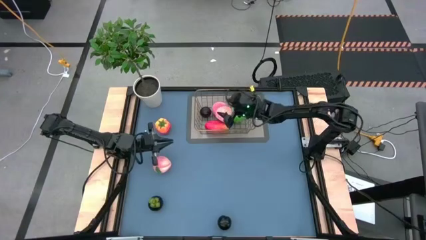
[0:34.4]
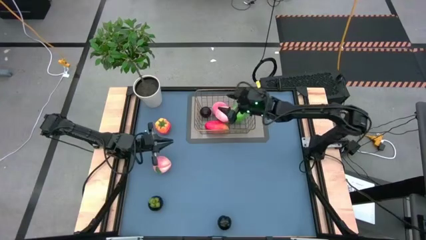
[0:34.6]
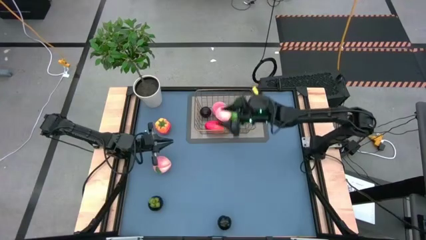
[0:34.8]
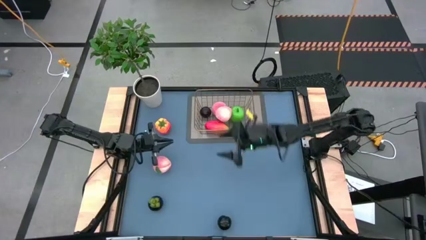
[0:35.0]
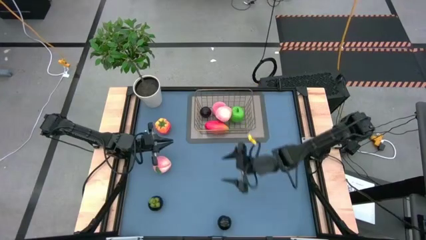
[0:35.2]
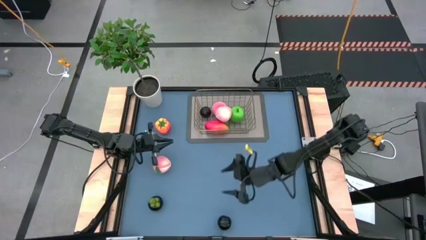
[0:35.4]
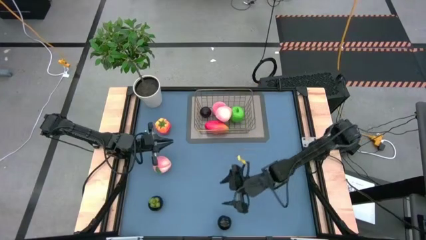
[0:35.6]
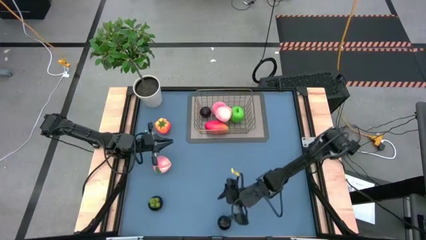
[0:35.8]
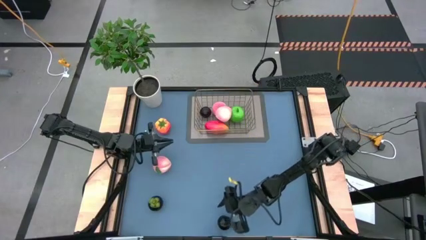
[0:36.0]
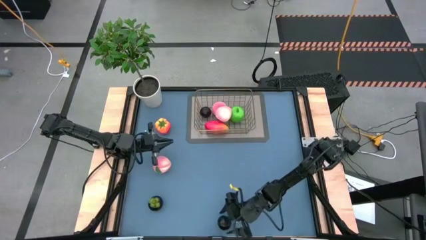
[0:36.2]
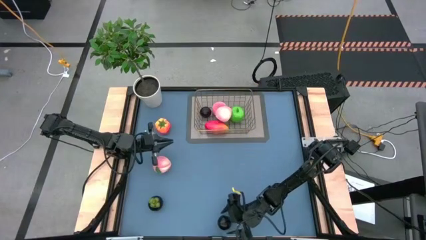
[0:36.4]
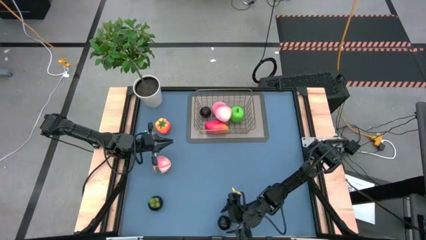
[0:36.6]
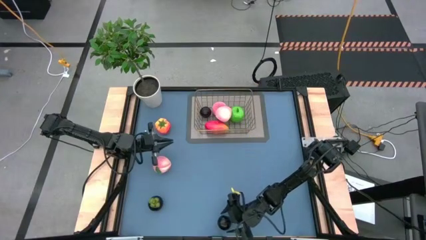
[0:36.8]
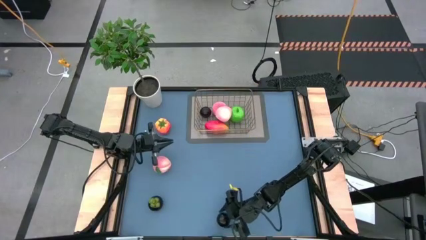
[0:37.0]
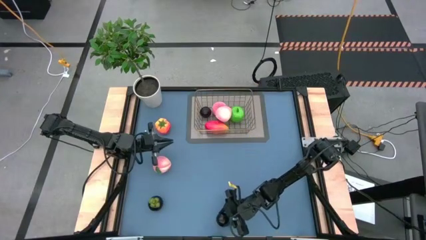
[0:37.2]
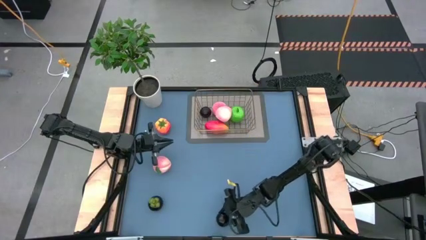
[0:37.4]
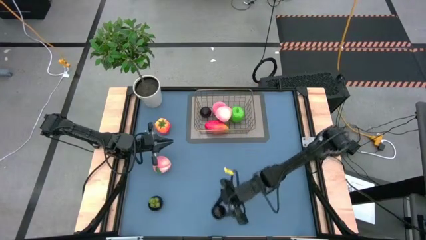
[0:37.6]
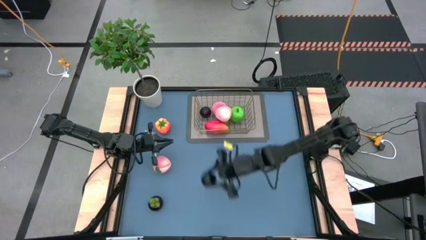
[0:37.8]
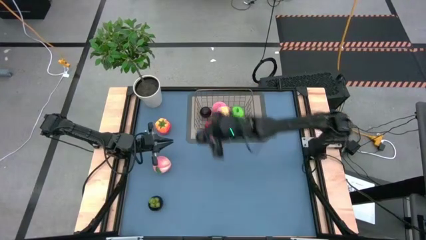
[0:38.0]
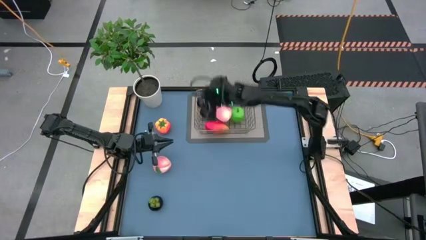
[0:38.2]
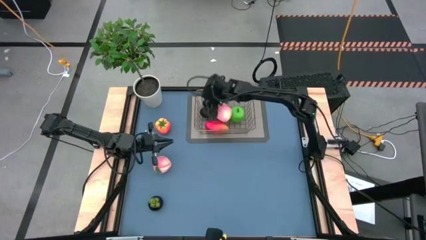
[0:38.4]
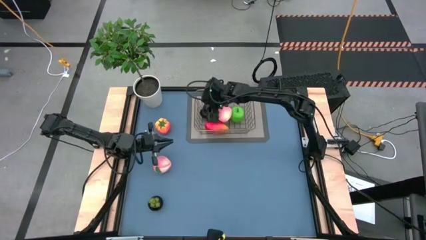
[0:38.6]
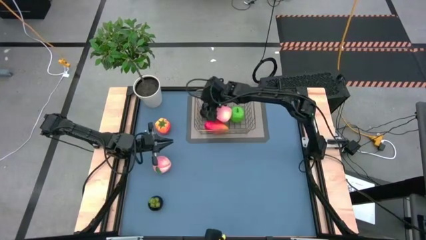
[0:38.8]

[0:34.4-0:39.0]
Task: Build produce basket
Put the right black plum into the wire basket

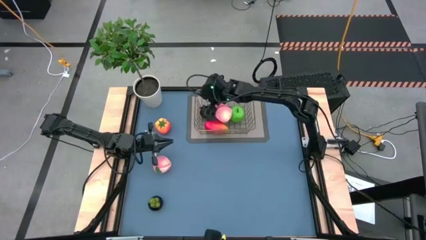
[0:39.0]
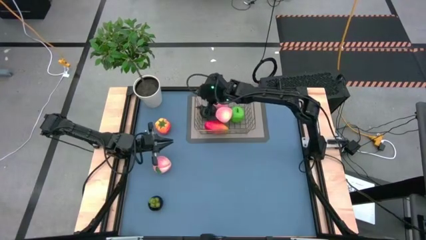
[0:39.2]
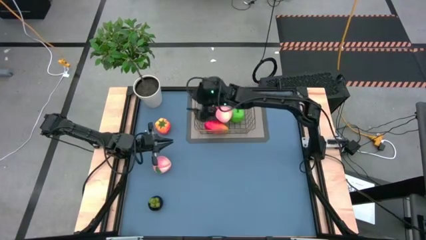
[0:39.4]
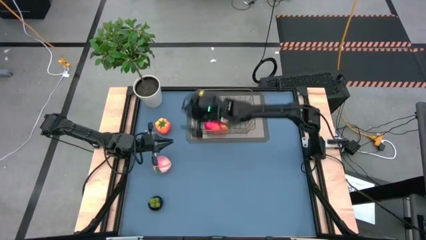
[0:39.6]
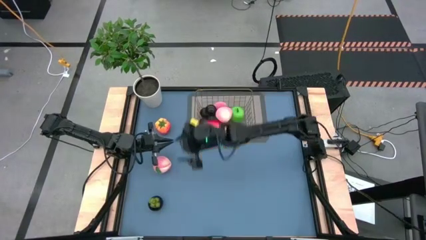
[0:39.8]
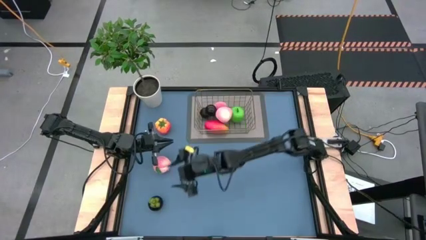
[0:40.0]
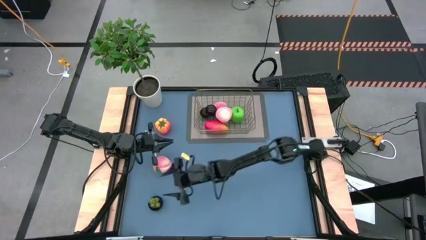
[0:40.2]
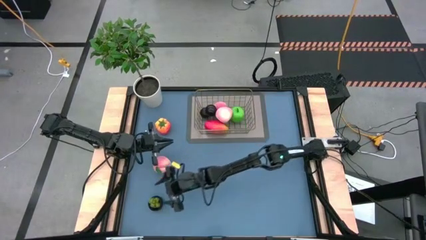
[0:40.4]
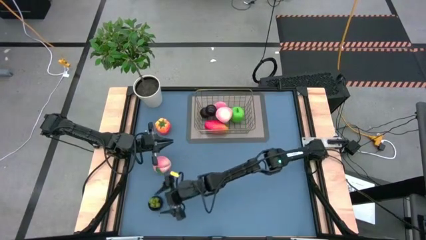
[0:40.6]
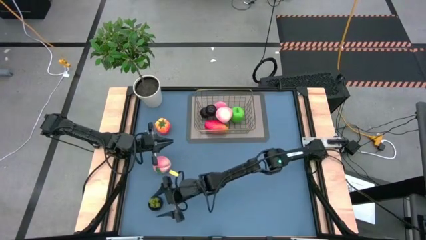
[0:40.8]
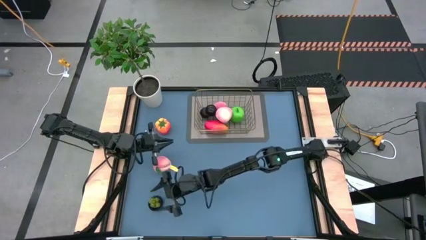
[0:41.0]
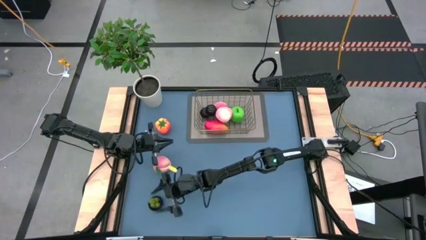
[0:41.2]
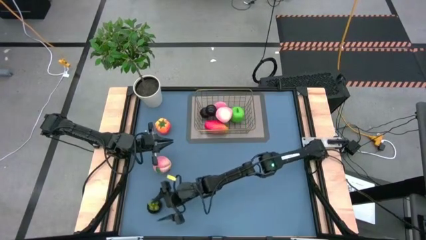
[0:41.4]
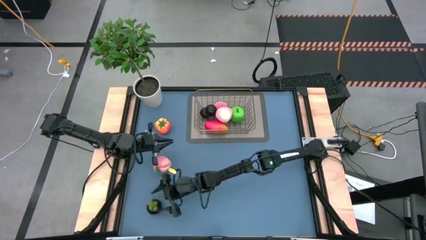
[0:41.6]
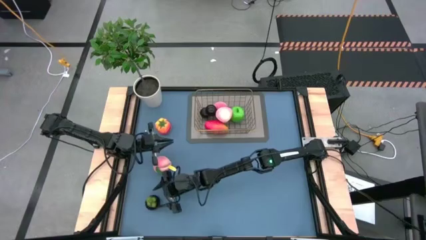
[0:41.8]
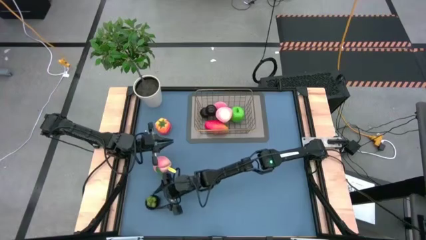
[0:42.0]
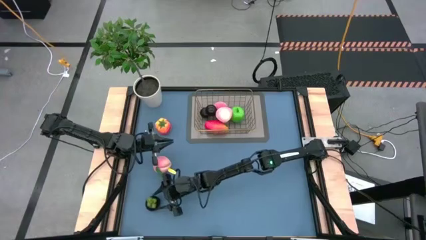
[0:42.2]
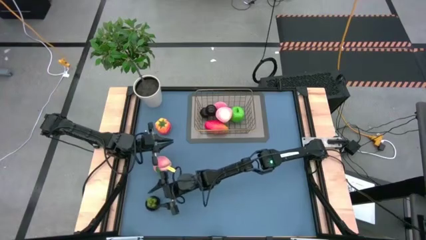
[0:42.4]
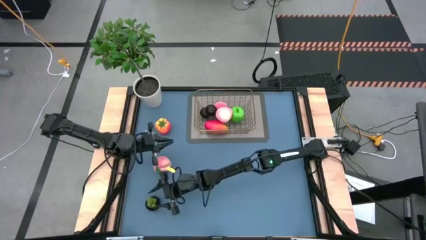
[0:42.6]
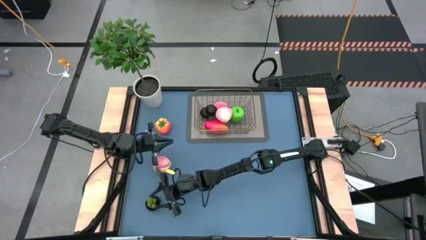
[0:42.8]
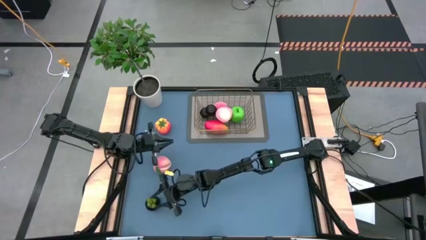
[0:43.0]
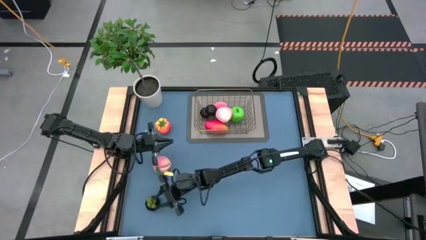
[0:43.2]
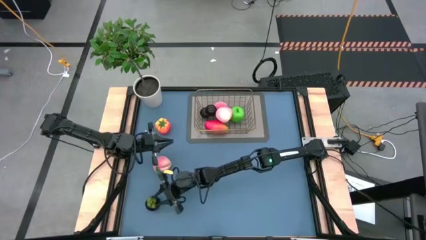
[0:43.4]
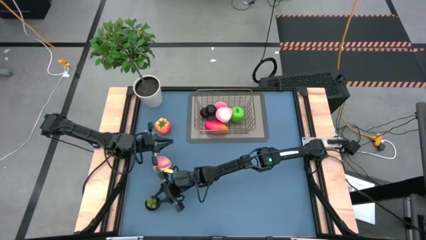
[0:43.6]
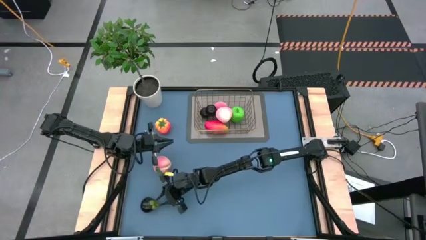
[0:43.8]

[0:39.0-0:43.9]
Put the black plum into the wire basket

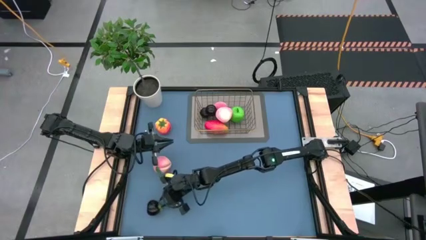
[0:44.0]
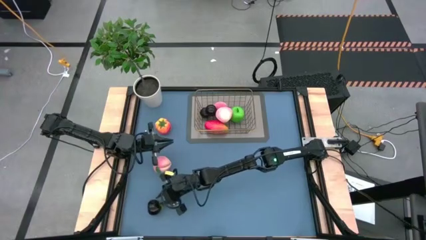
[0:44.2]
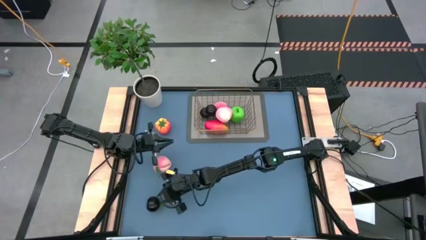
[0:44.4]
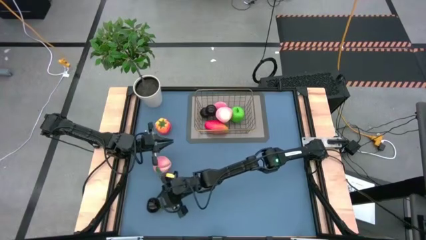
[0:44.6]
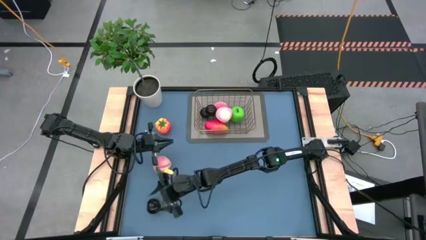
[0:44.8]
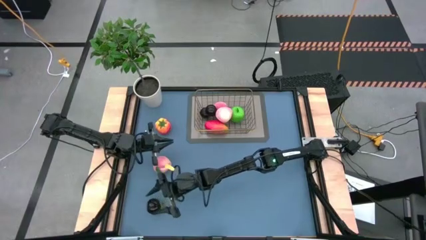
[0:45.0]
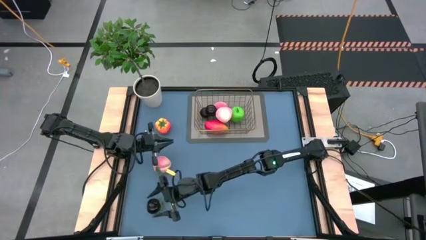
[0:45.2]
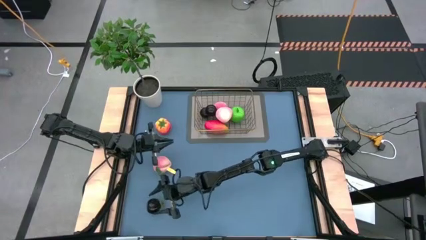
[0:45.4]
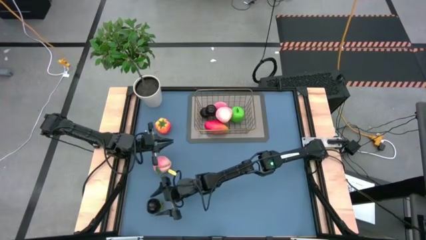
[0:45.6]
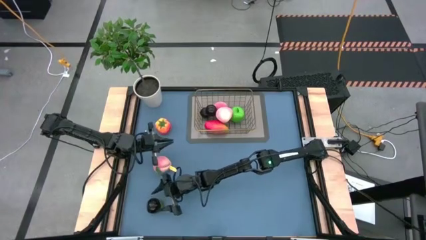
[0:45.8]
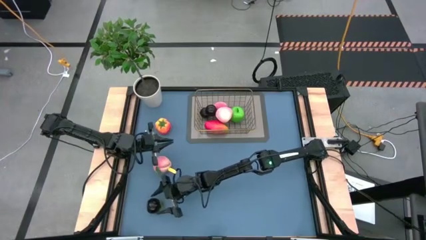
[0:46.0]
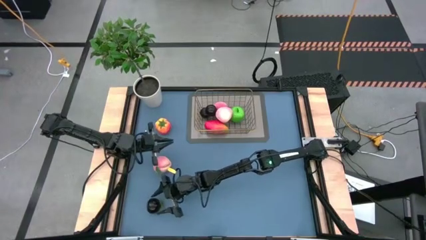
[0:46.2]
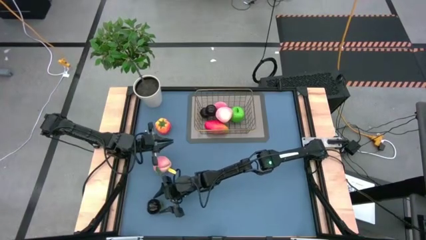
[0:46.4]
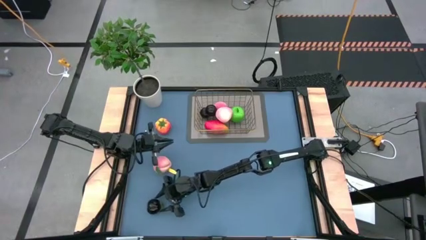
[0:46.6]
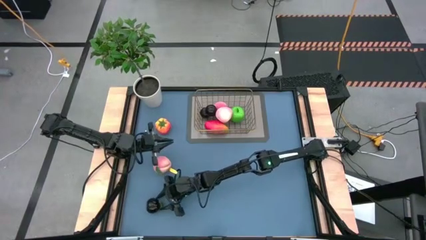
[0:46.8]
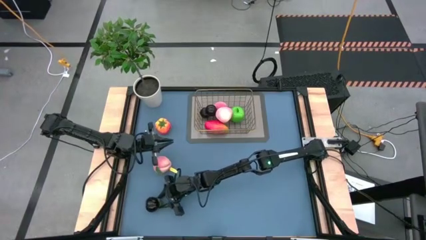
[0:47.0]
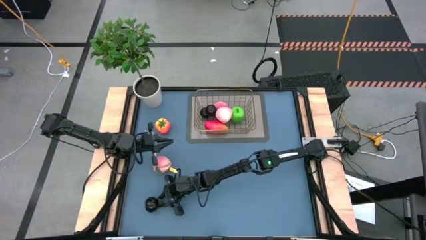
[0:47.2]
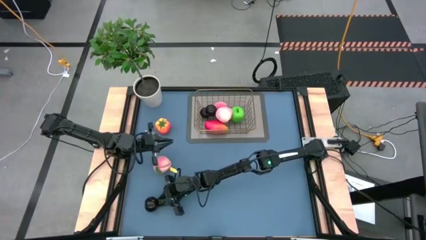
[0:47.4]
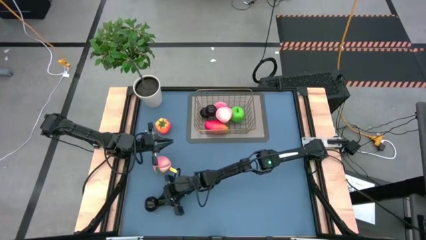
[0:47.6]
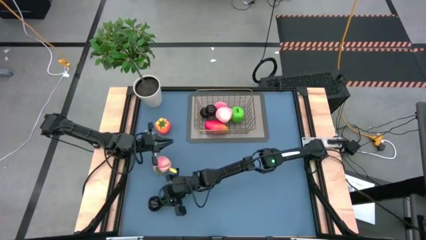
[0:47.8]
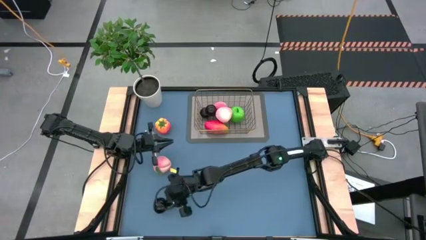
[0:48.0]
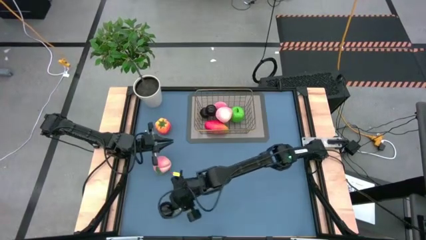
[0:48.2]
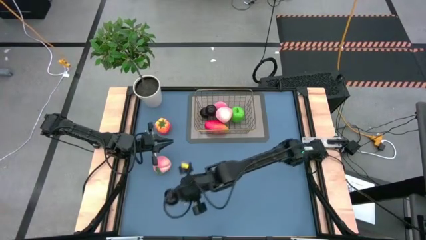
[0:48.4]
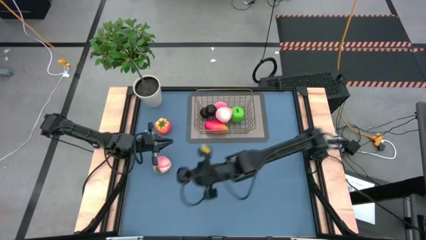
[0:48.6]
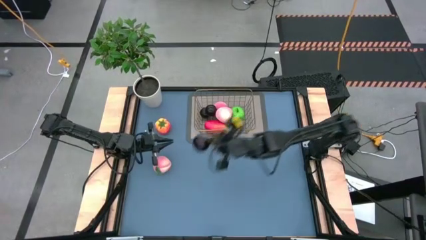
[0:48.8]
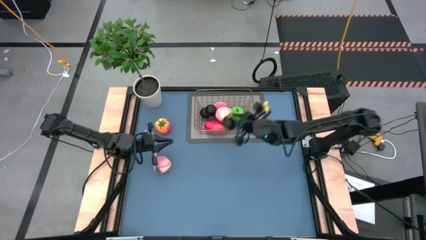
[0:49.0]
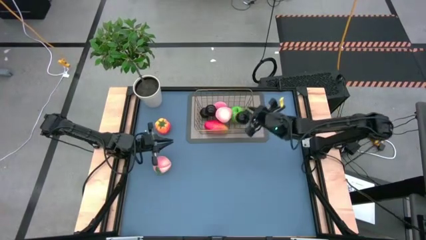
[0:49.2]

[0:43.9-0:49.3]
Put the black plum into the wire basket

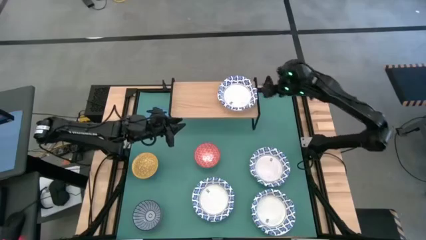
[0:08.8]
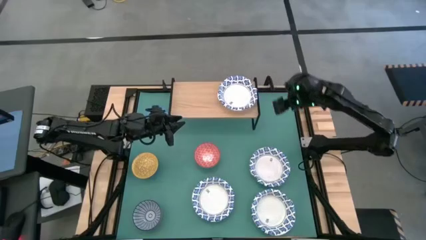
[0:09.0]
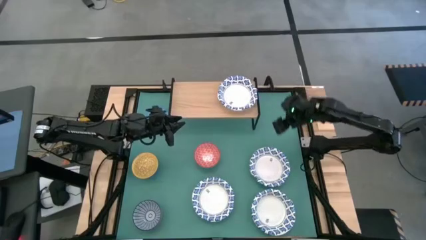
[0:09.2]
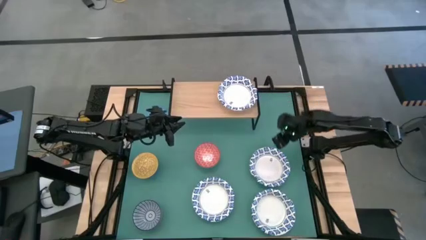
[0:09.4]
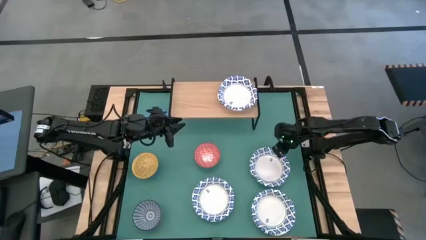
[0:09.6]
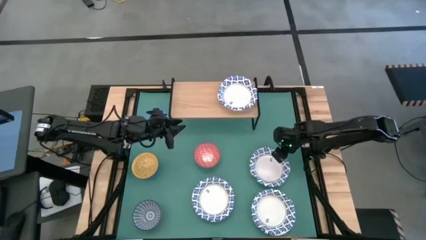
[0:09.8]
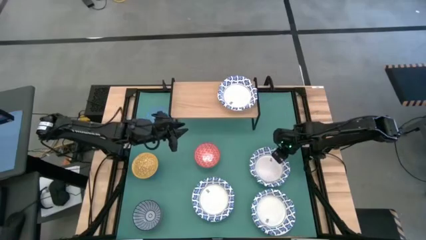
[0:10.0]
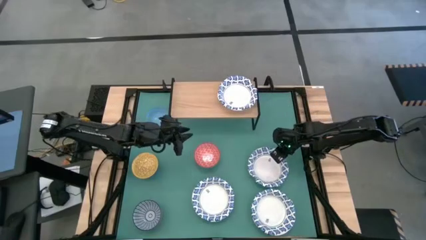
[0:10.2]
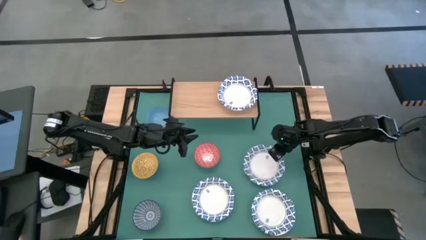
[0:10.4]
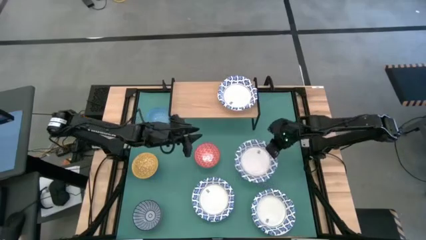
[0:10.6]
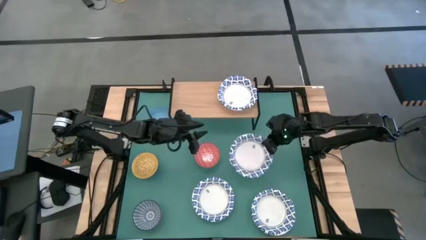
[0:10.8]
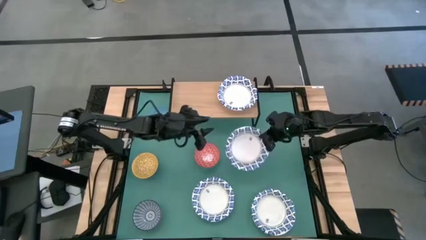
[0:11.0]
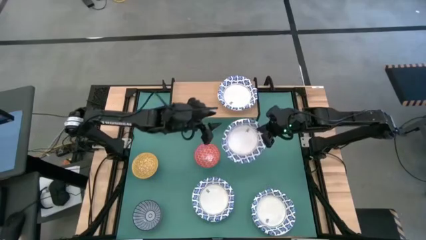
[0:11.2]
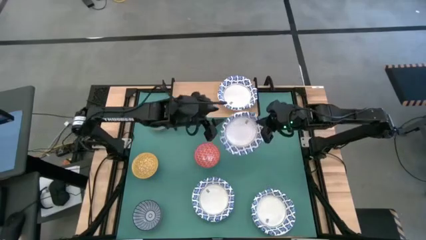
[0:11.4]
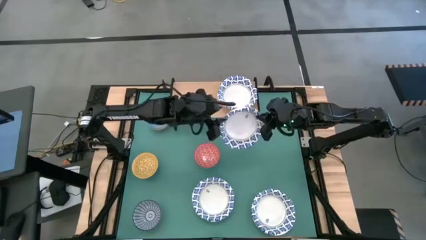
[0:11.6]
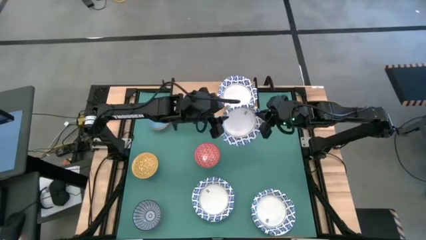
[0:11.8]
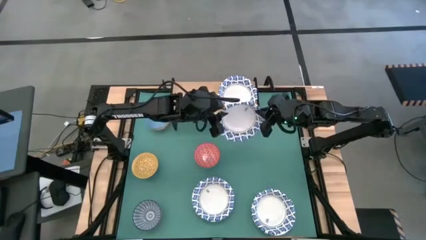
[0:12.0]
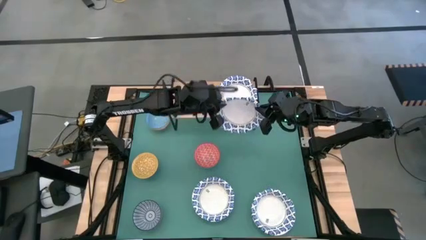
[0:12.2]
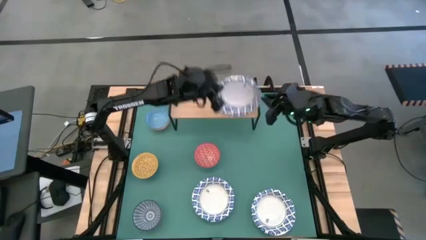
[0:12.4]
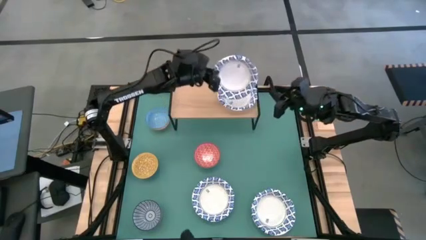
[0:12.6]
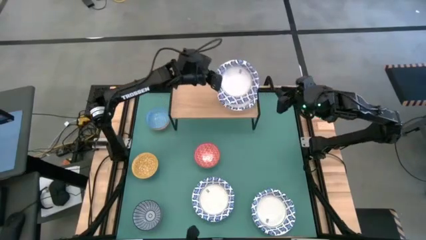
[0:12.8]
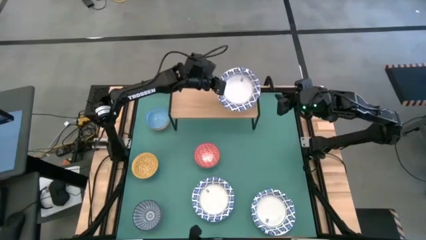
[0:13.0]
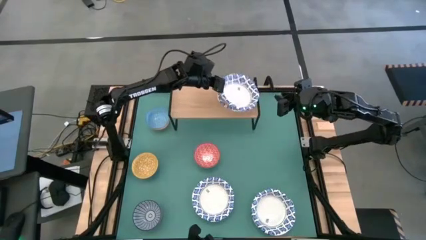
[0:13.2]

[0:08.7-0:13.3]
Task: Place and stack bowls onto a shelf
Stack the white patterned bowl on top with the other white patterned bowl on the shelf
